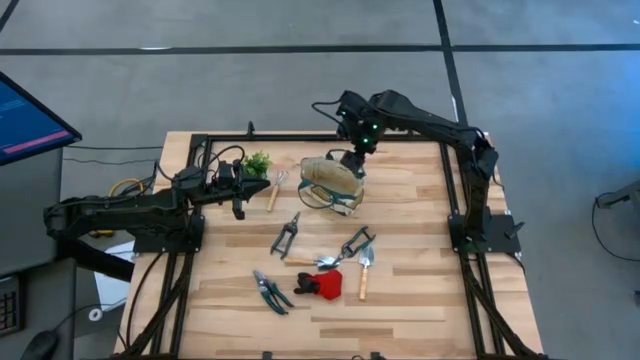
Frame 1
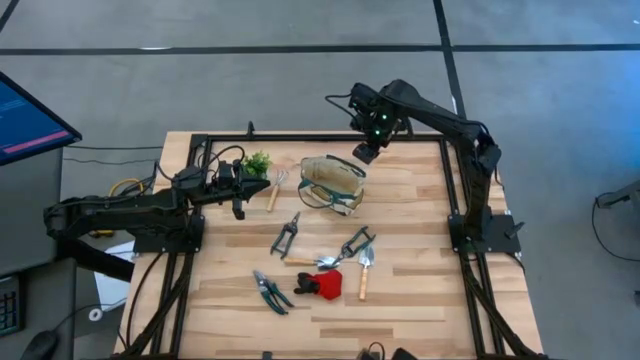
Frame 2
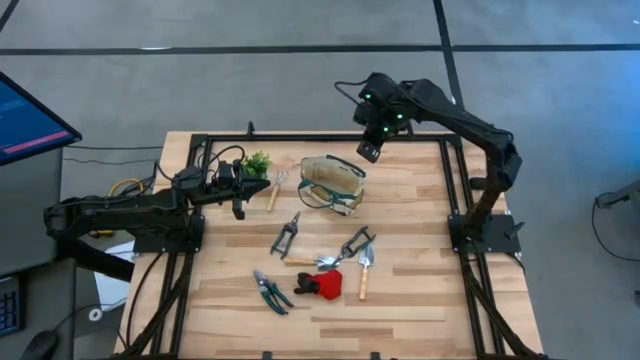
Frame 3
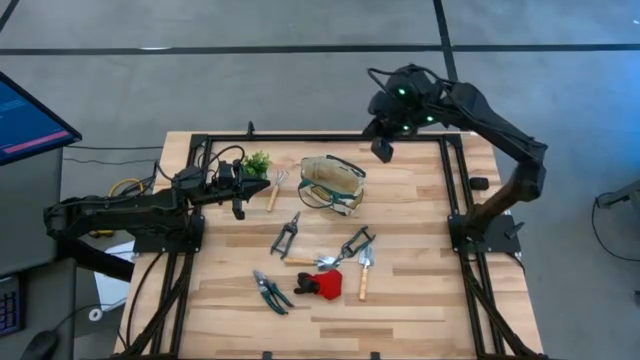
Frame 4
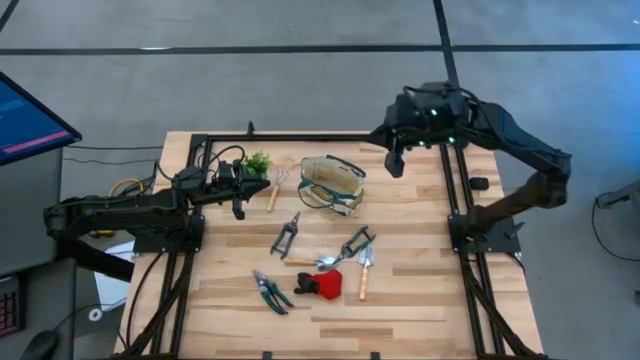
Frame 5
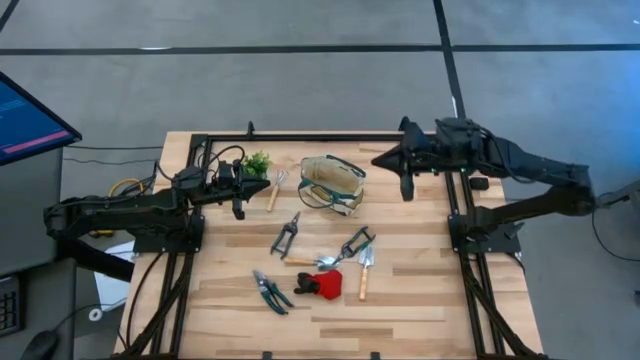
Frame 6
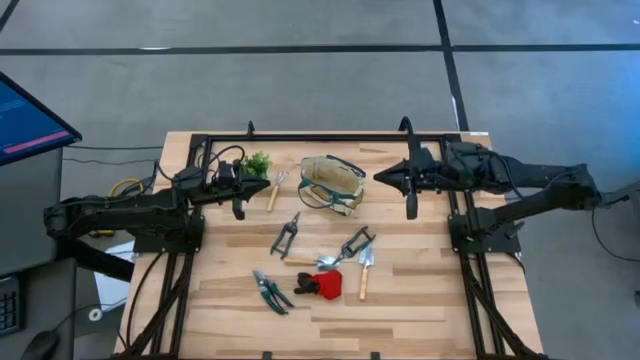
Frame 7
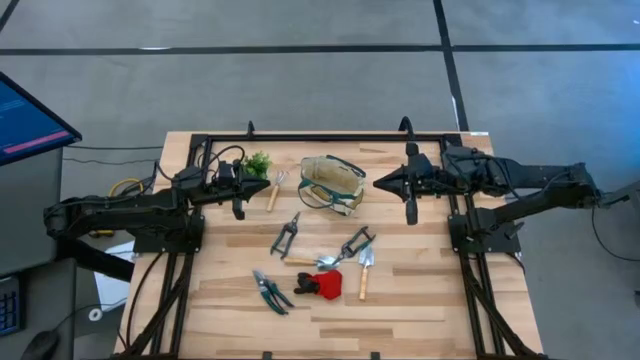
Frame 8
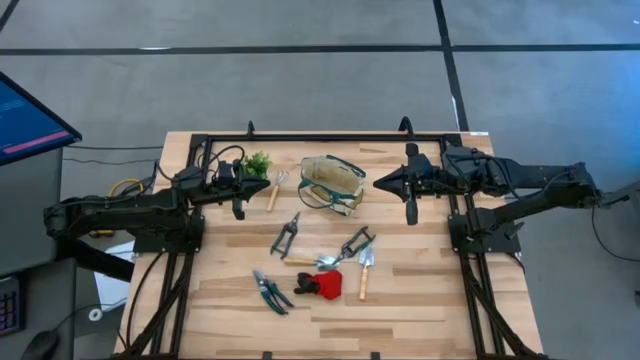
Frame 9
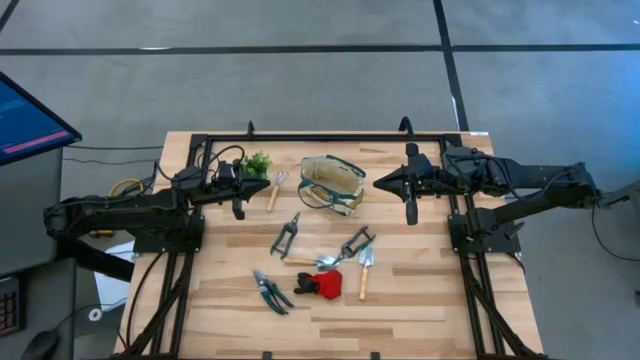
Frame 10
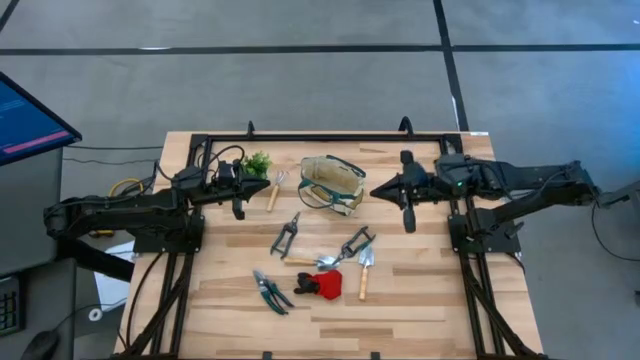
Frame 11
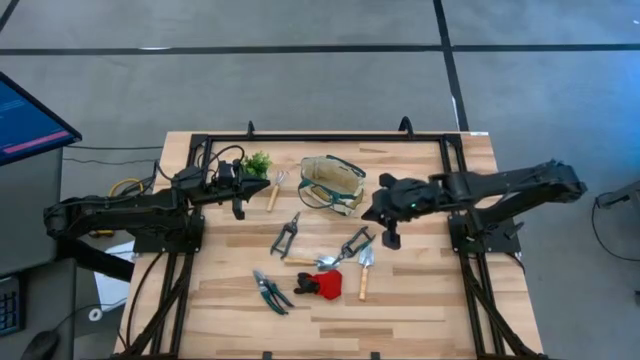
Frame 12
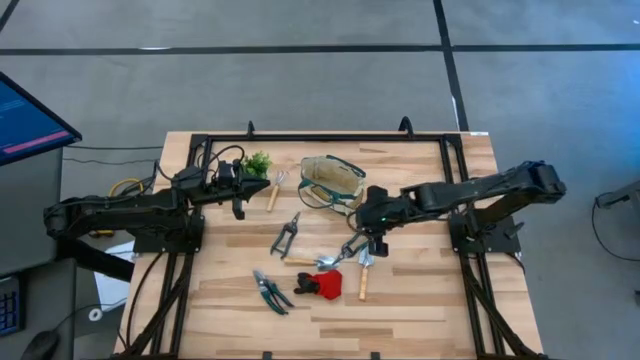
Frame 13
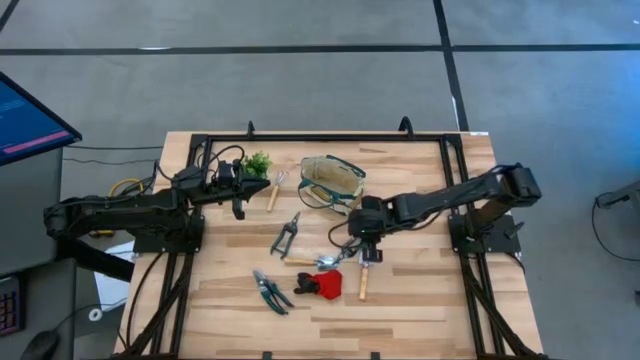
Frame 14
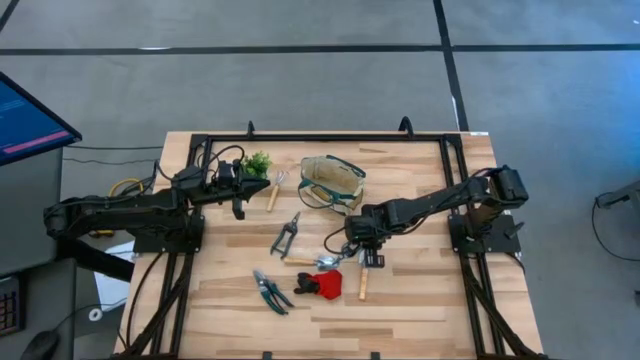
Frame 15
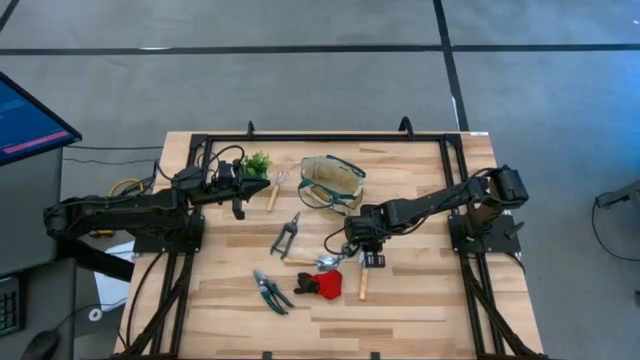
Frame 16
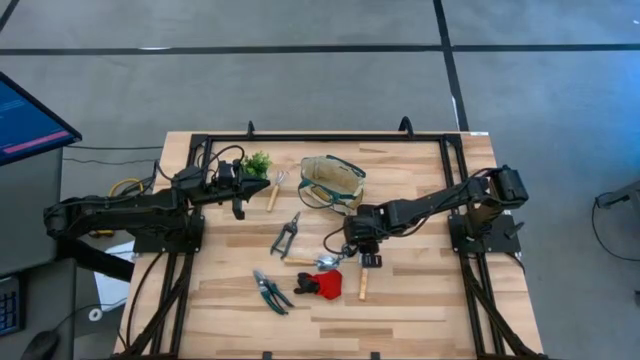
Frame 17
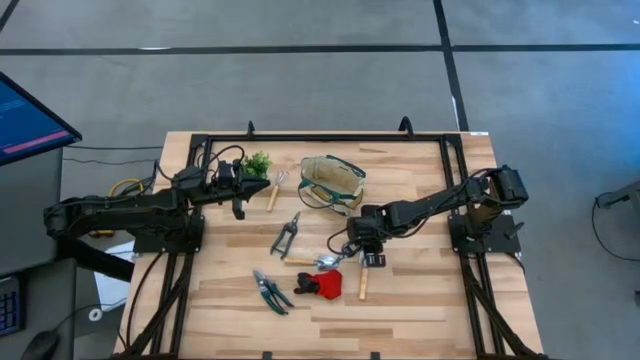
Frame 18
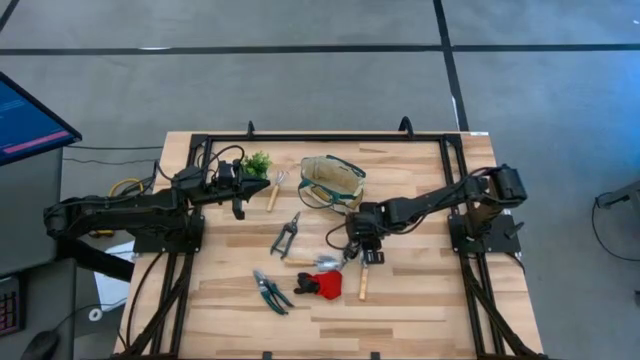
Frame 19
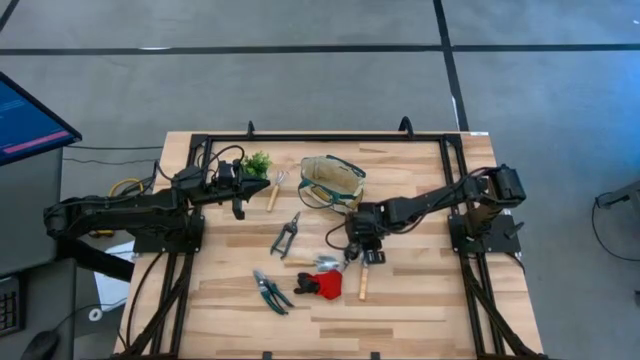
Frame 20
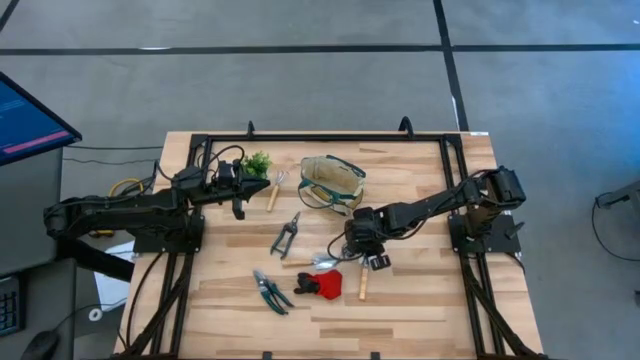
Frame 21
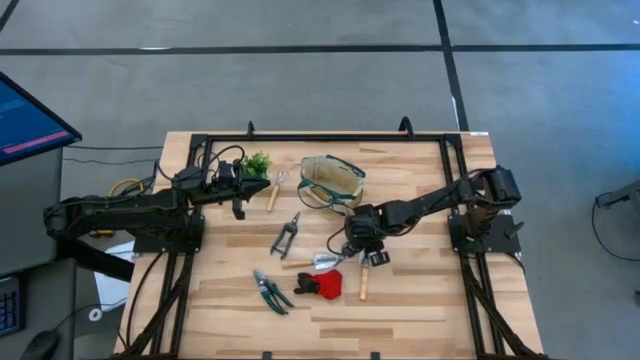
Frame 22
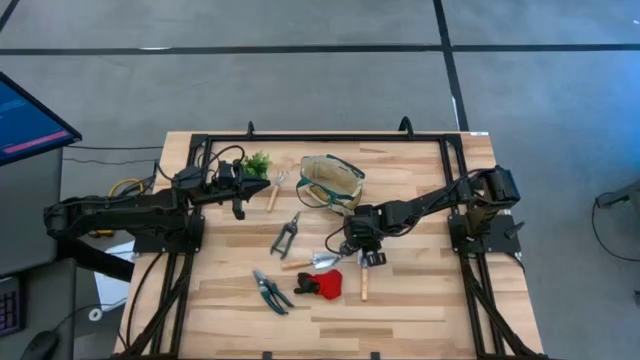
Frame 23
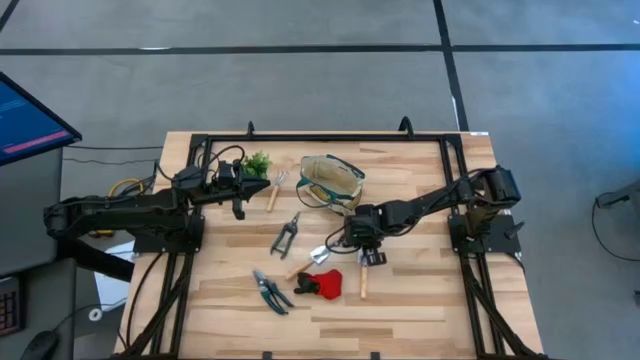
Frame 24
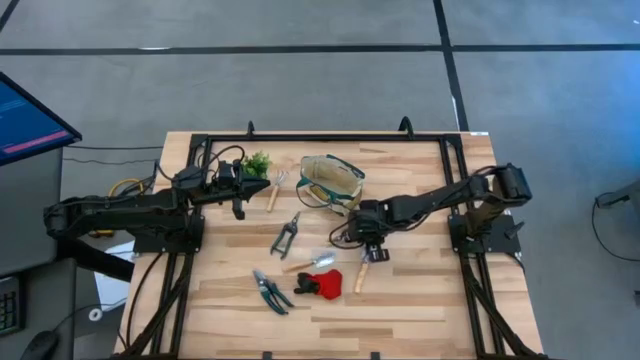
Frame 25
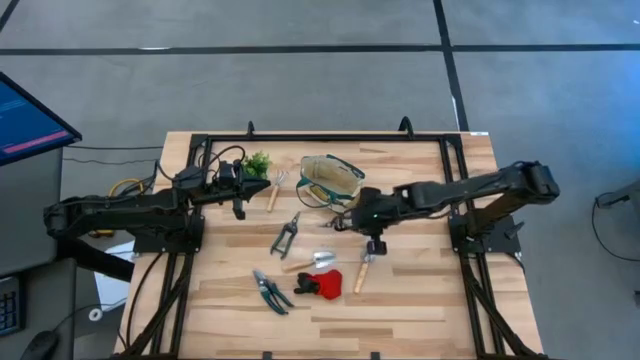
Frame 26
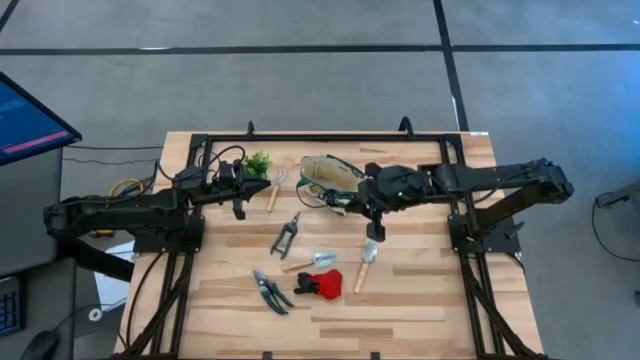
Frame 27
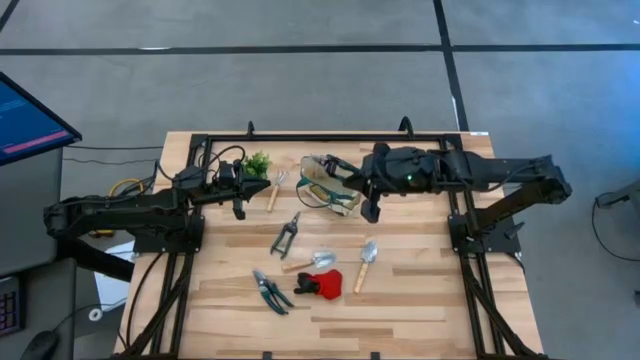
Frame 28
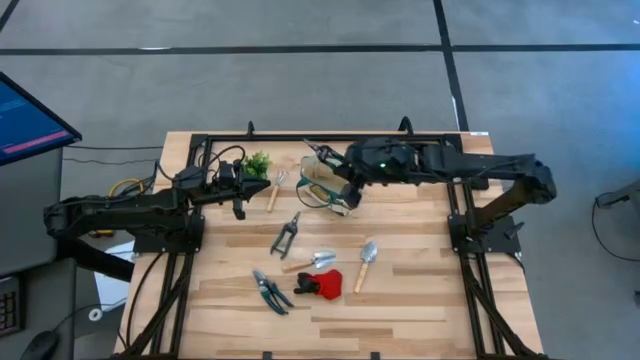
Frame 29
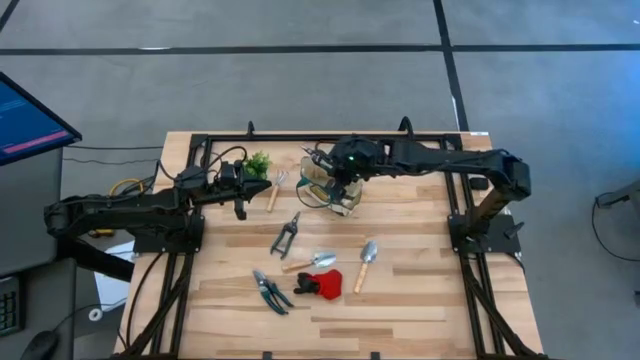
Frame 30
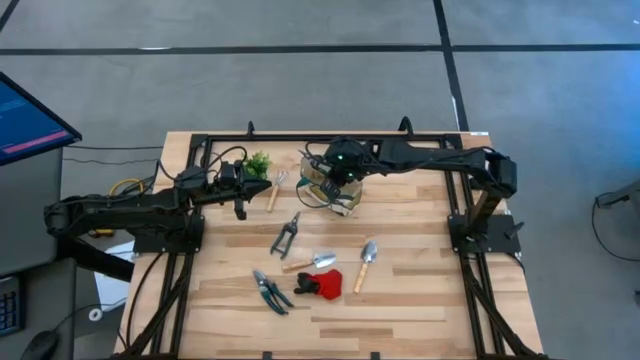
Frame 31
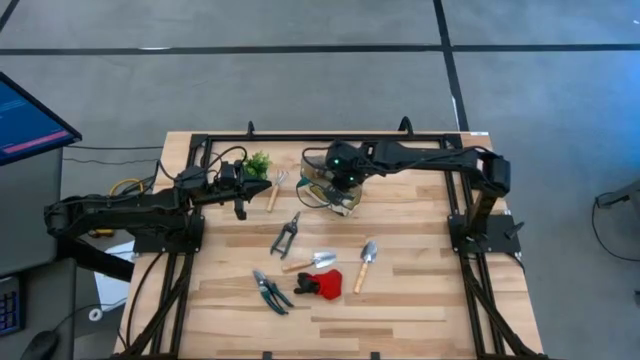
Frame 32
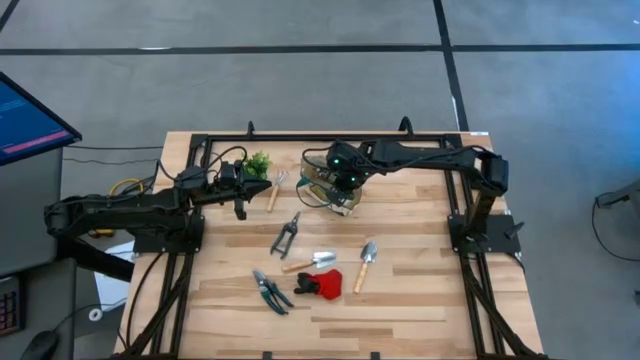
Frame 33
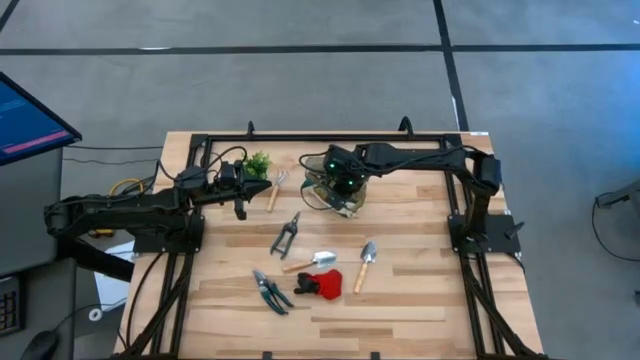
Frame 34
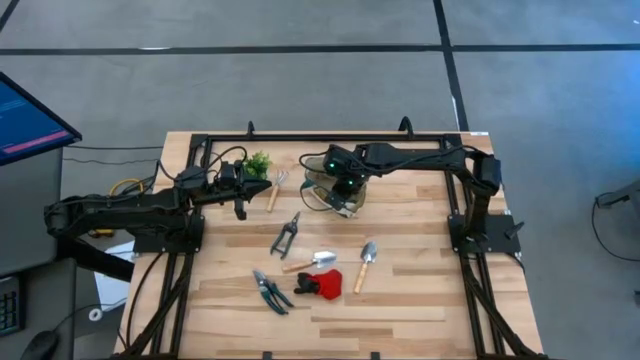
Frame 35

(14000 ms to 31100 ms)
Task: Pick & Place Garden tools in Gardening bag
Put the top right shear scissor into the gardening bag
